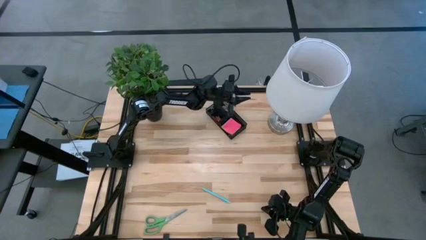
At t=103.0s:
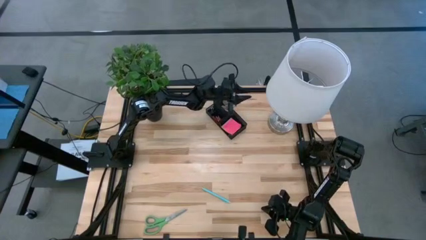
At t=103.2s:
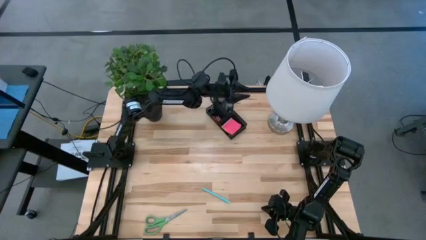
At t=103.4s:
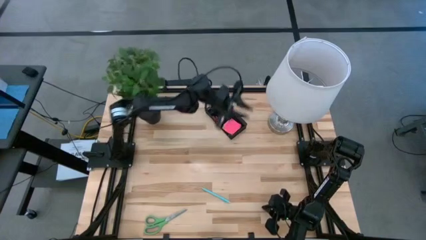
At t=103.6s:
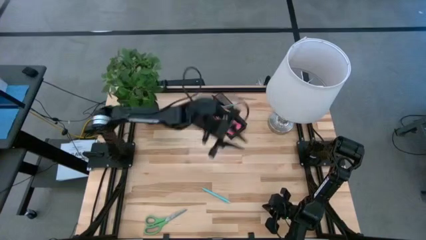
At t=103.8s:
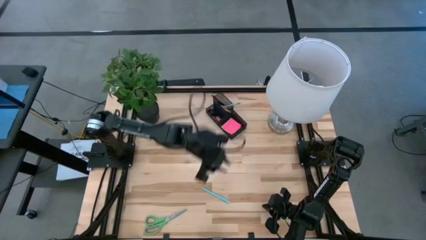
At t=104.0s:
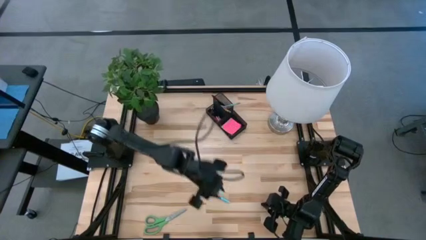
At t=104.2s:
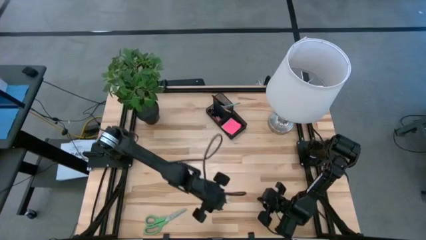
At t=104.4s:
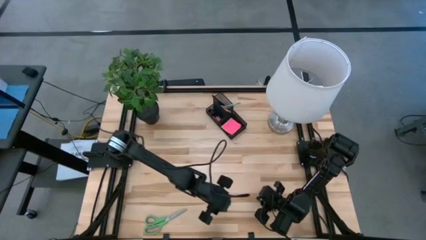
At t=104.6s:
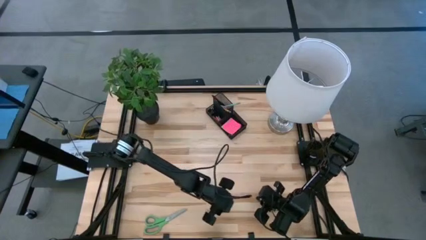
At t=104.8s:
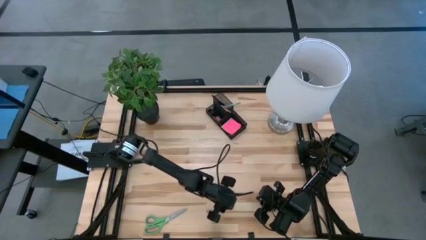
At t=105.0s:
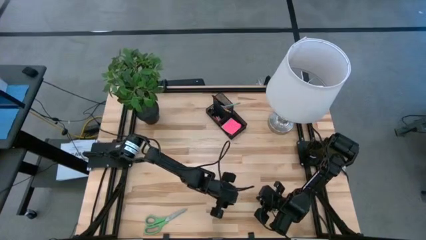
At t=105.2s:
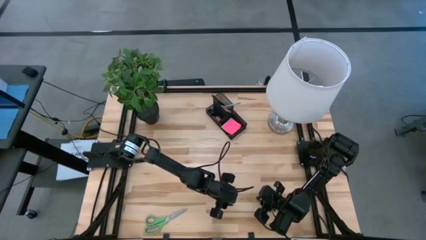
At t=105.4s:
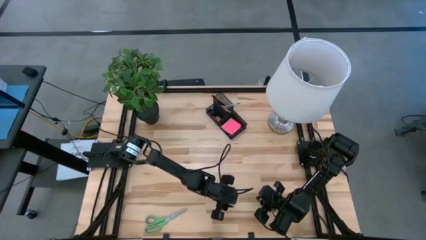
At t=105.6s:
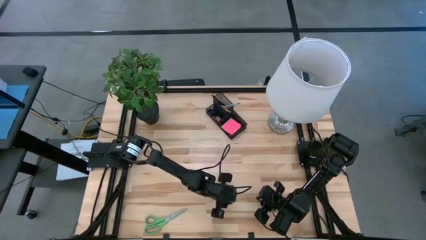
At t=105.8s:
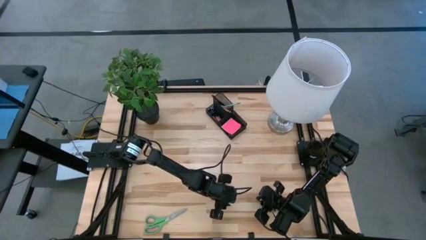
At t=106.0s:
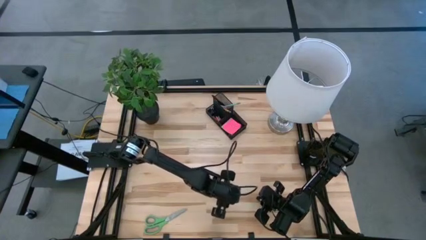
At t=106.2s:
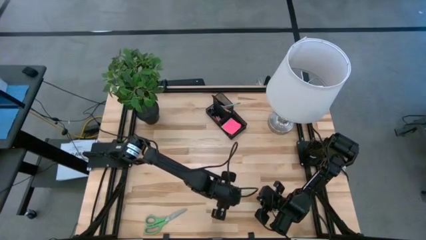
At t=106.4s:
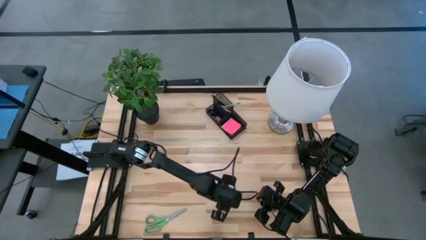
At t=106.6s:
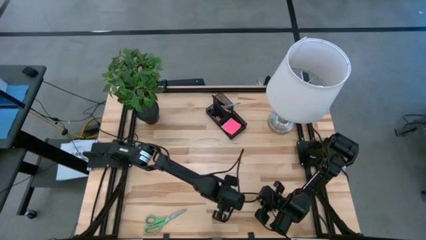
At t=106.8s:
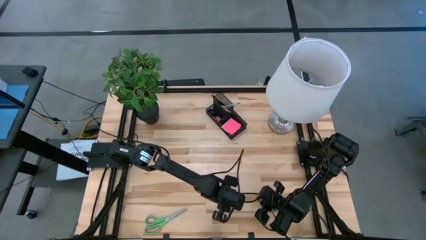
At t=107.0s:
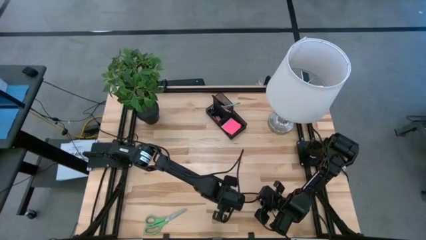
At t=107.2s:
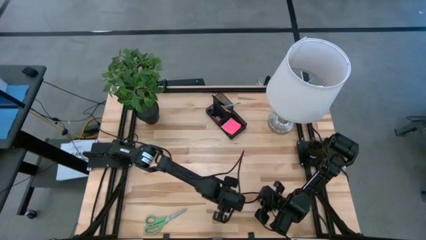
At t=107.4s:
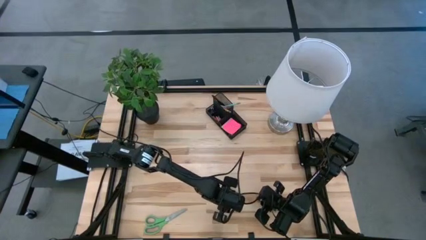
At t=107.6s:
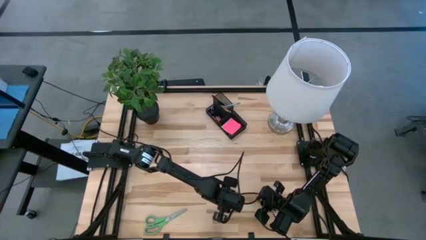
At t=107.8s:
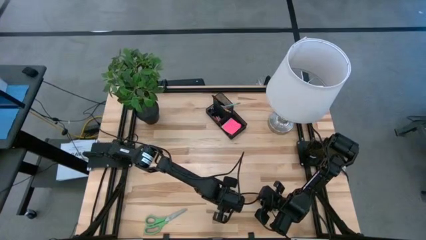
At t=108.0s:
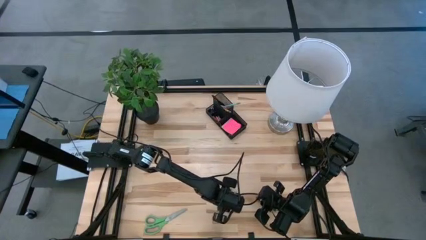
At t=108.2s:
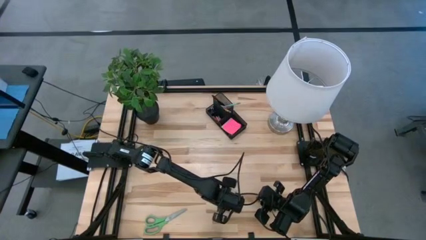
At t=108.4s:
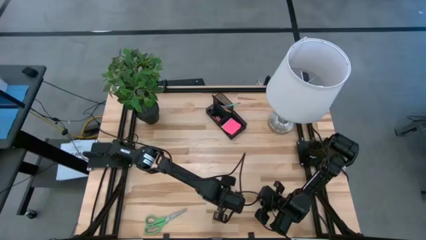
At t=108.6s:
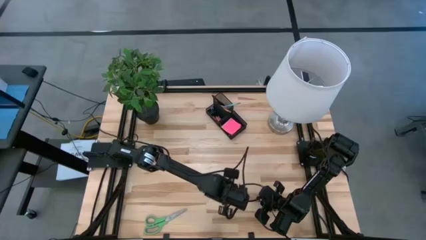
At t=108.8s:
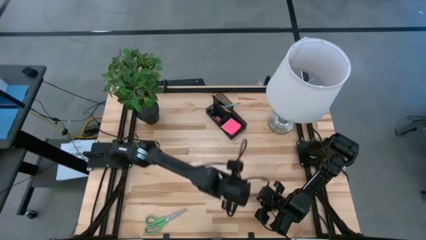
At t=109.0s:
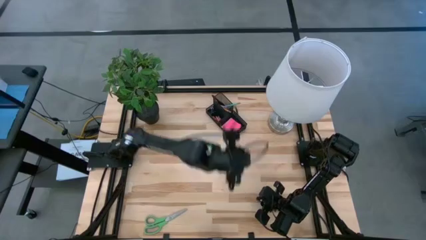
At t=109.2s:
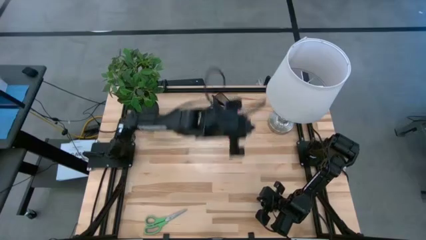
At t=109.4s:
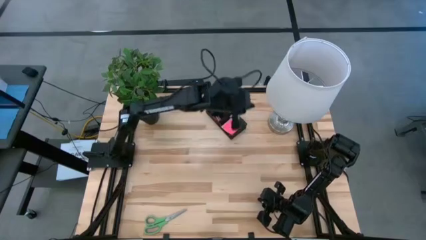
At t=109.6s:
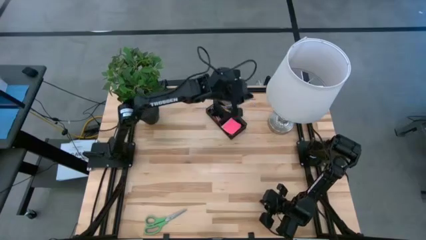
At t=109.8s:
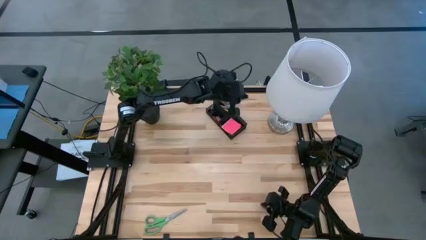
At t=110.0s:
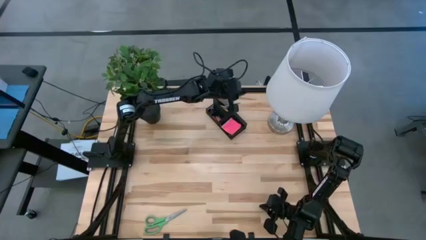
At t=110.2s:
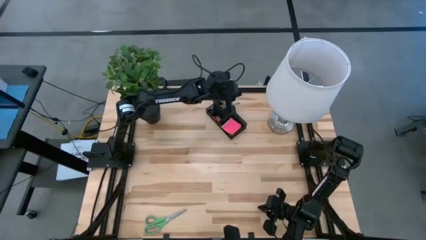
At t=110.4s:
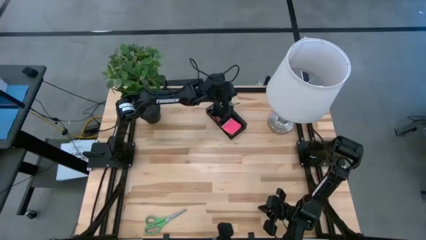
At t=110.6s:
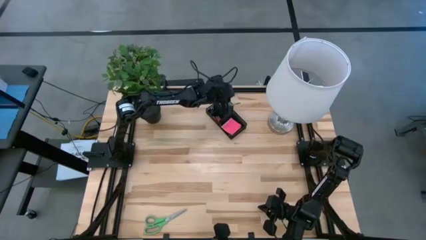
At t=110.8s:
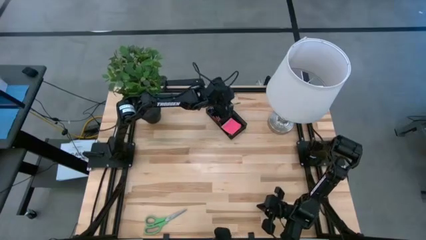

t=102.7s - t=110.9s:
Task: Pick and place office supplies into organizer
Put the blue pen into the desk organizer

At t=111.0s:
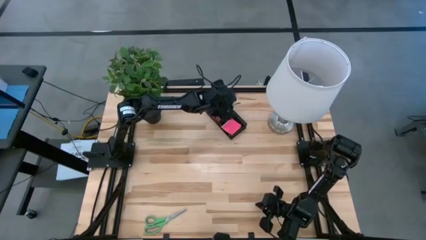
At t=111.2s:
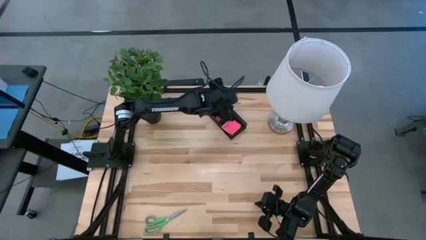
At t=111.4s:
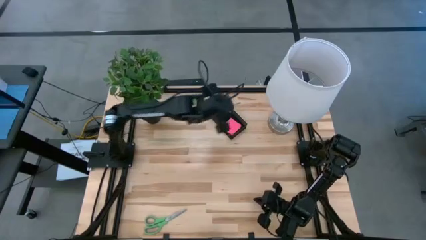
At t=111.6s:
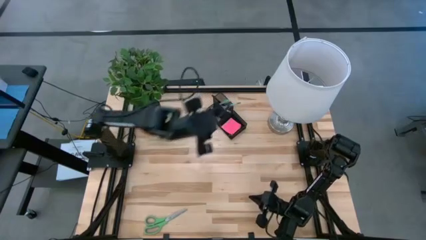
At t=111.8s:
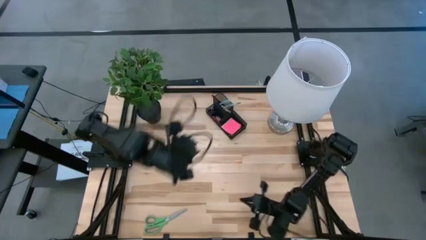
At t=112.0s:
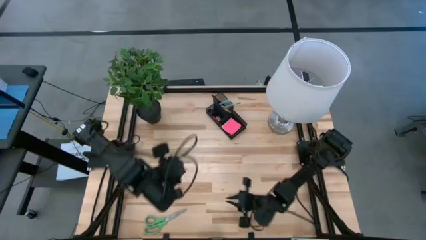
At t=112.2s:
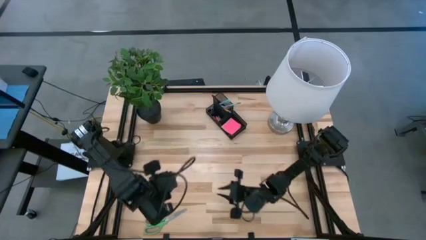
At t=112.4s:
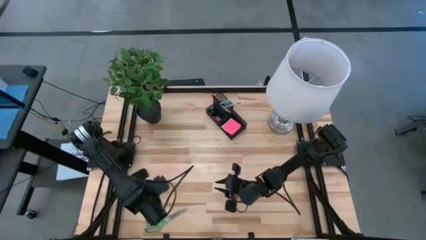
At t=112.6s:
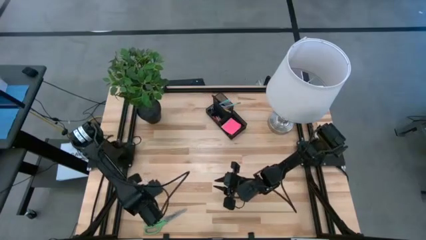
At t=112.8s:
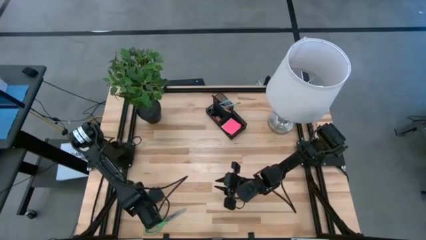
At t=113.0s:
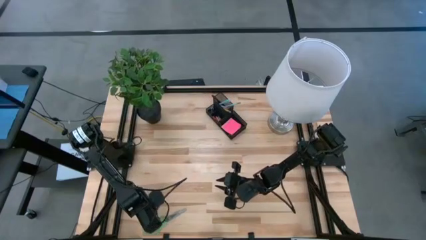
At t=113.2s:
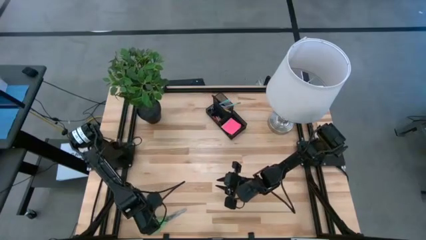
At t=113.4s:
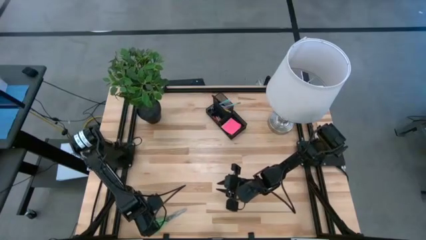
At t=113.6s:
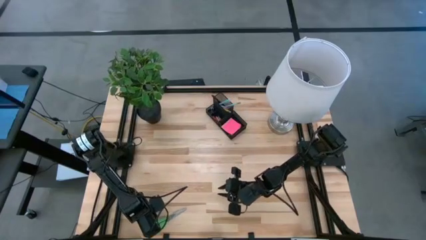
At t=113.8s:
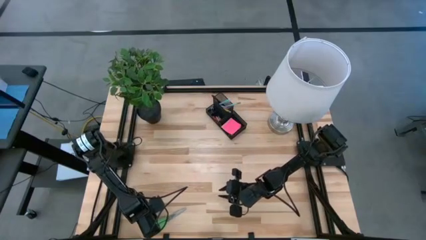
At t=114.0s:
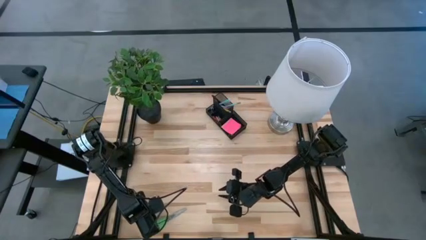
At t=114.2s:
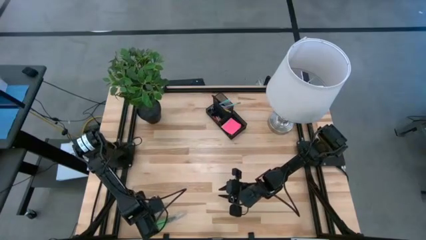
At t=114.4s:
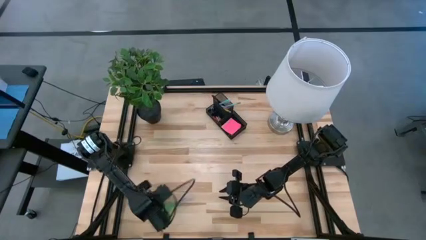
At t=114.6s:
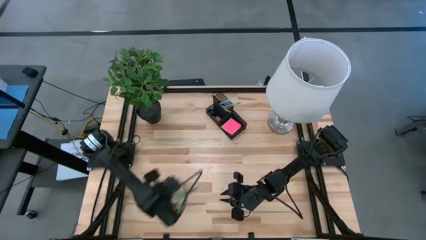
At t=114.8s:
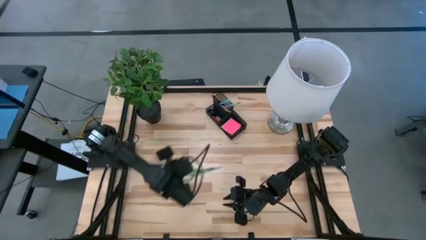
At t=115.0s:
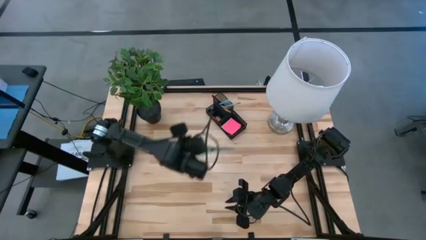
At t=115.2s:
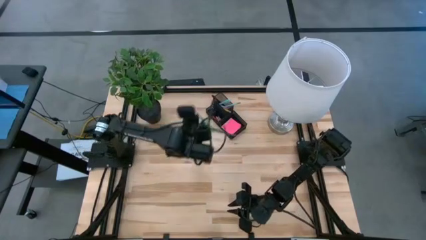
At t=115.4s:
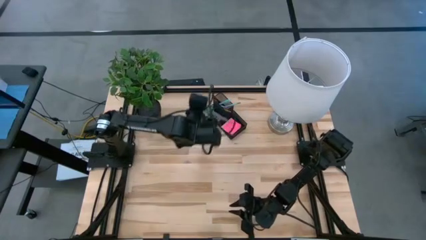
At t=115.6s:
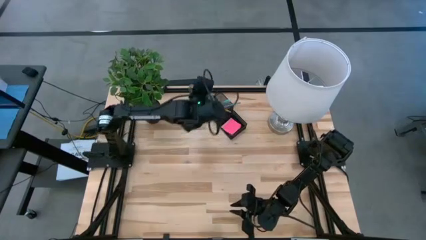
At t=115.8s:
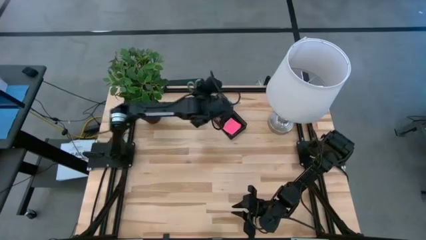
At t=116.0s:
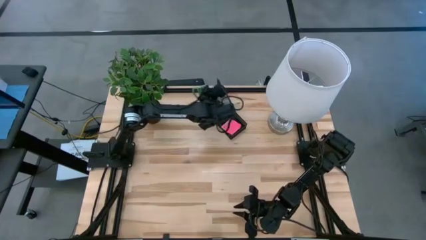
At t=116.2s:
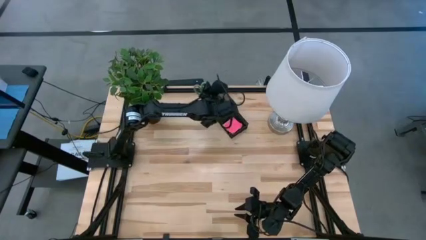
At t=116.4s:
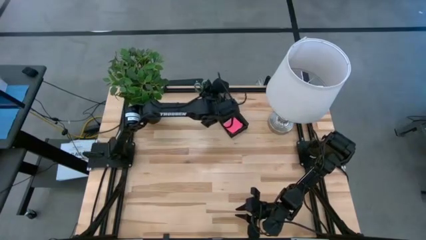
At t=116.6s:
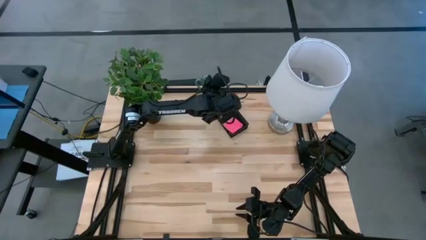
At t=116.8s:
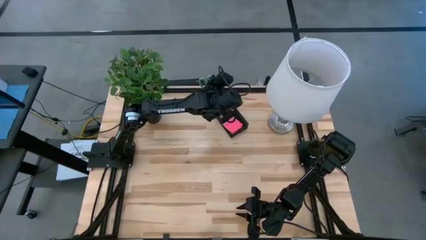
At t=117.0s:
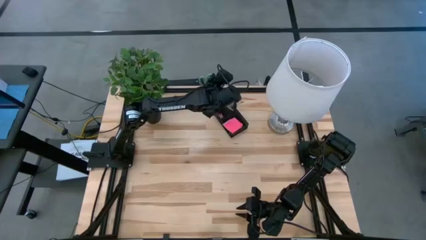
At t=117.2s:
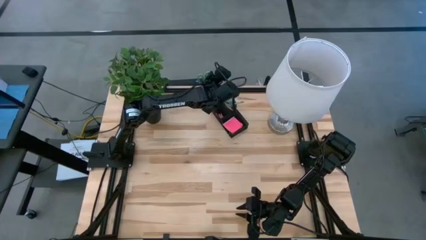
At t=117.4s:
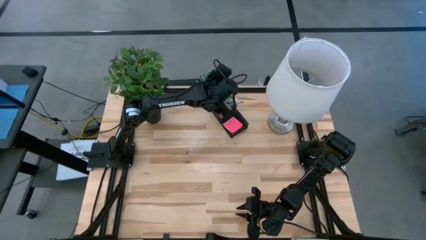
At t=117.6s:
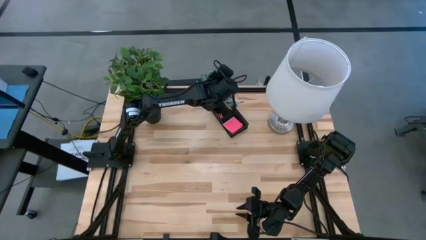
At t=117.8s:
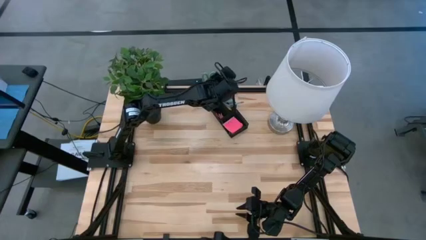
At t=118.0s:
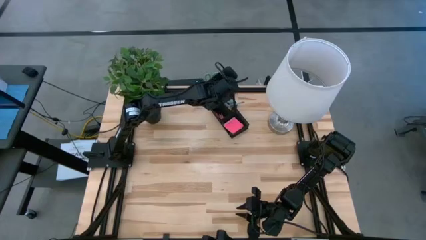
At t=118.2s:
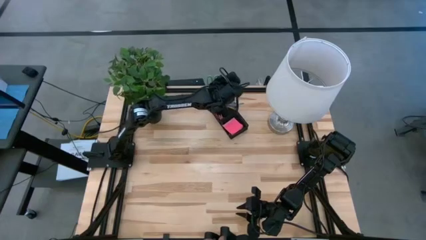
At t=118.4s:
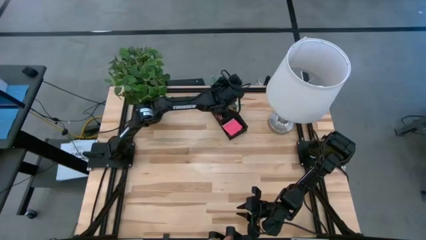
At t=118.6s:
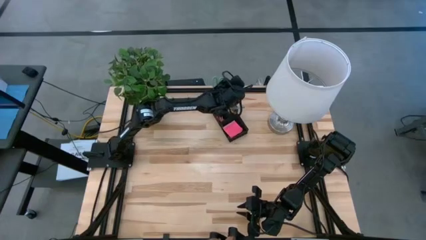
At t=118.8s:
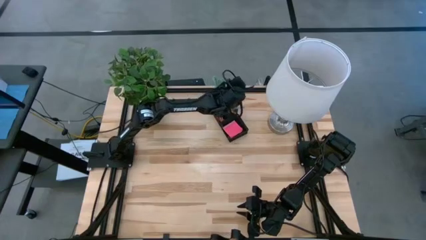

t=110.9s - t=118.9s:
Put the green scissors into the desk organizer
